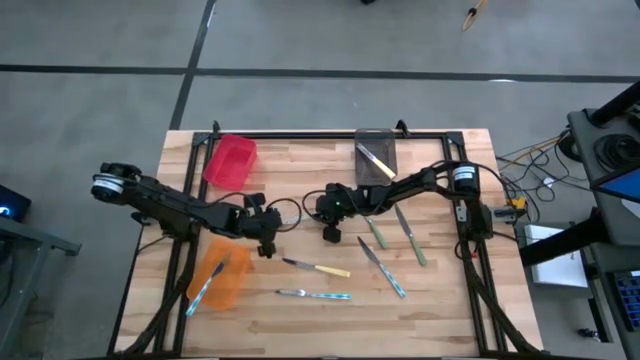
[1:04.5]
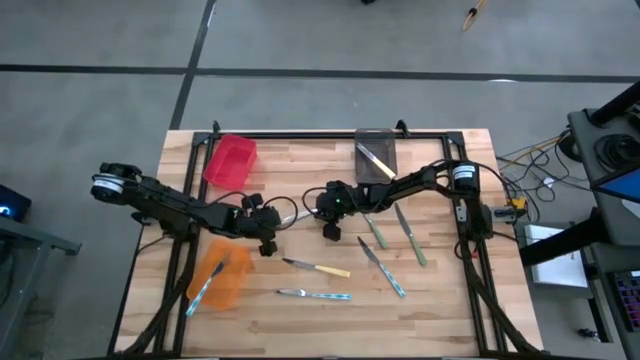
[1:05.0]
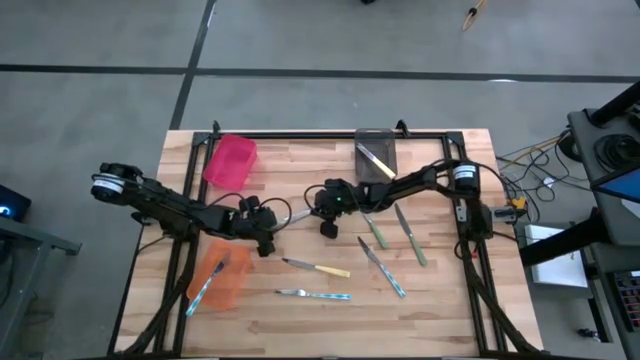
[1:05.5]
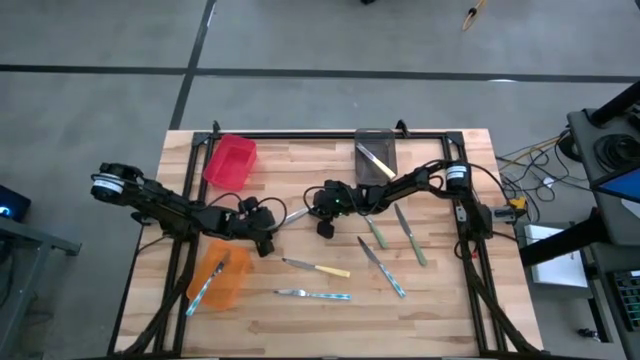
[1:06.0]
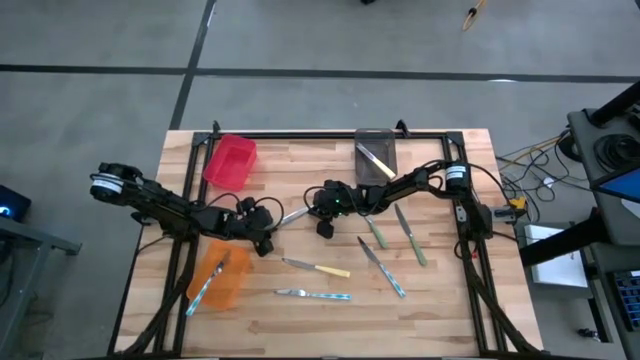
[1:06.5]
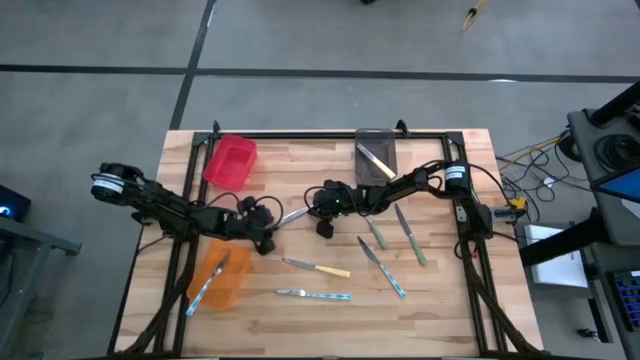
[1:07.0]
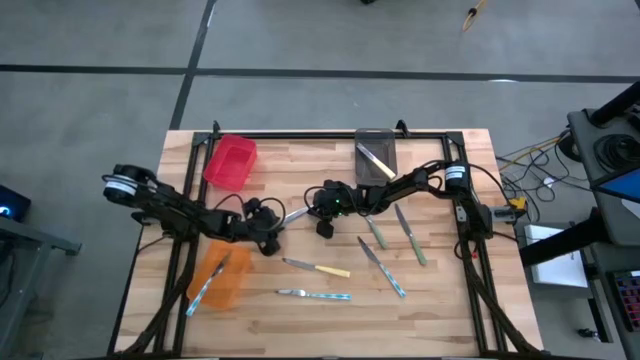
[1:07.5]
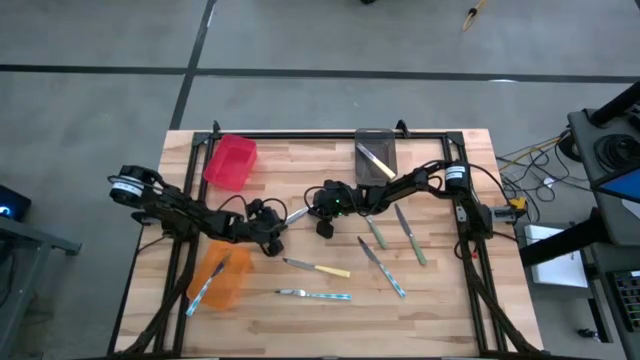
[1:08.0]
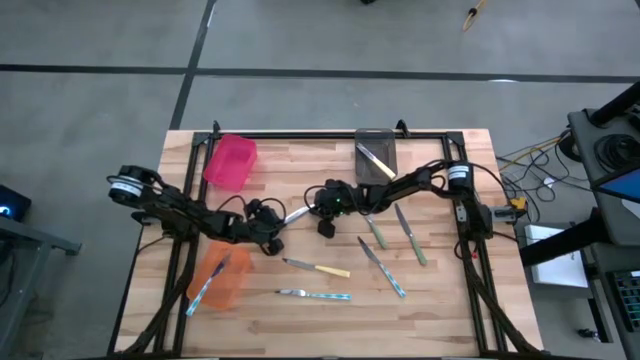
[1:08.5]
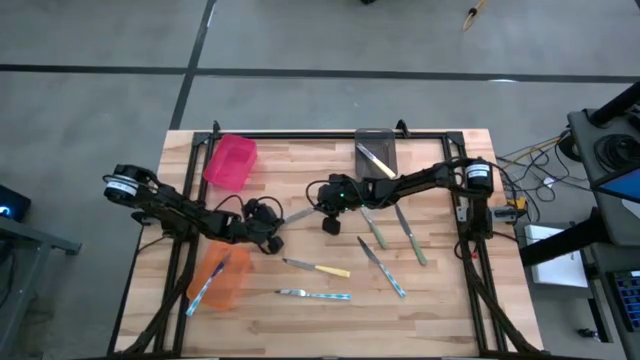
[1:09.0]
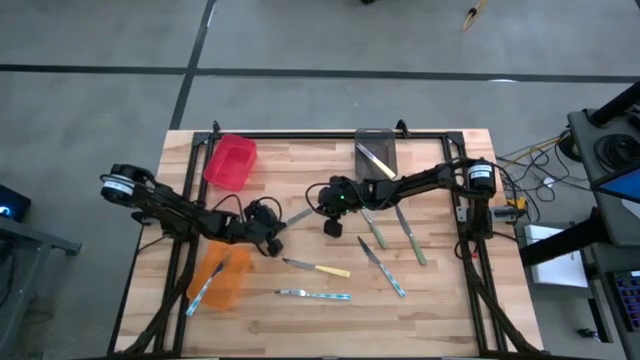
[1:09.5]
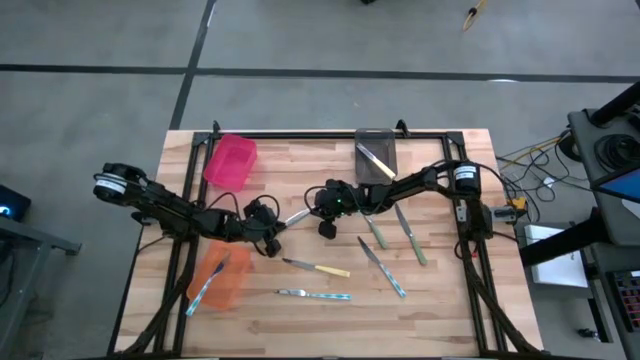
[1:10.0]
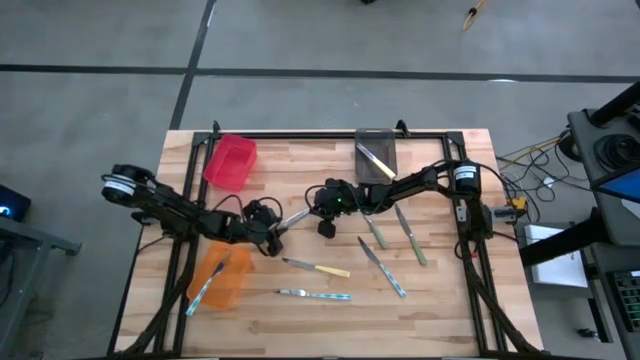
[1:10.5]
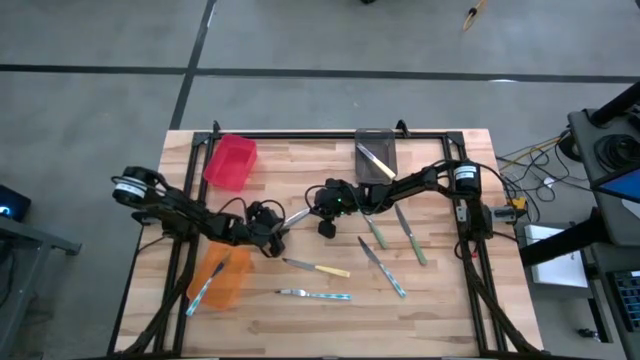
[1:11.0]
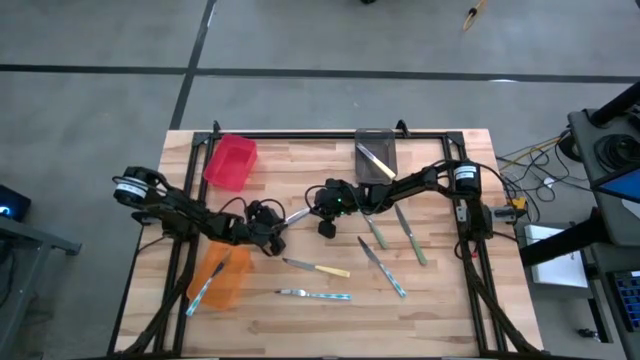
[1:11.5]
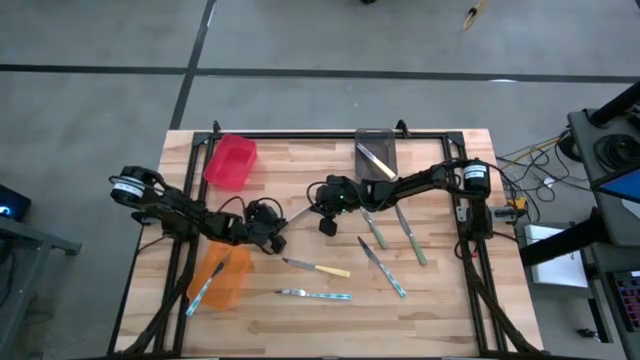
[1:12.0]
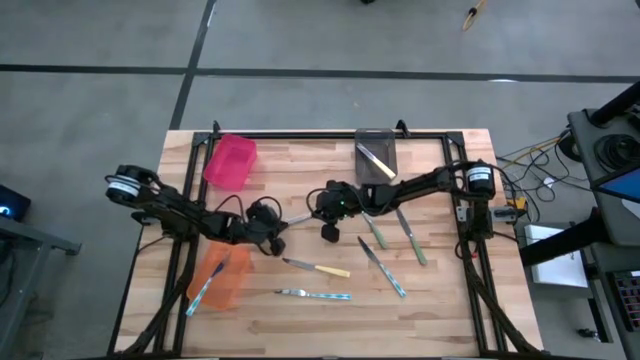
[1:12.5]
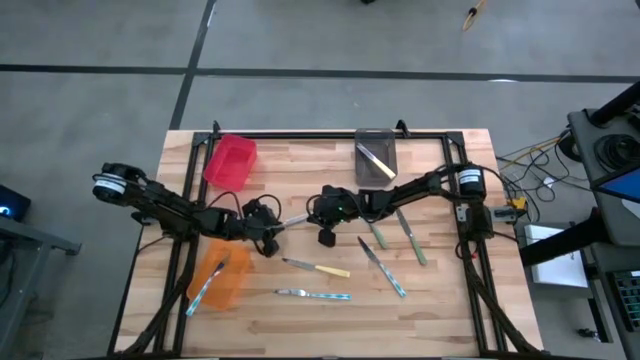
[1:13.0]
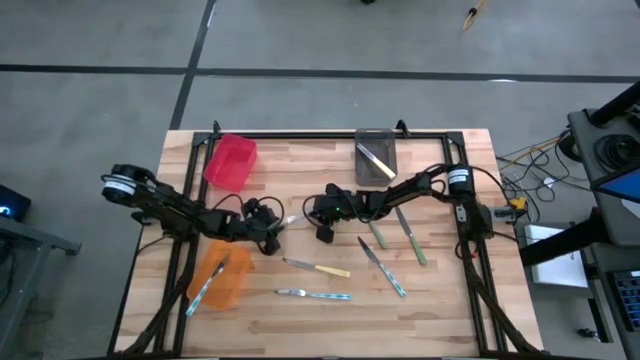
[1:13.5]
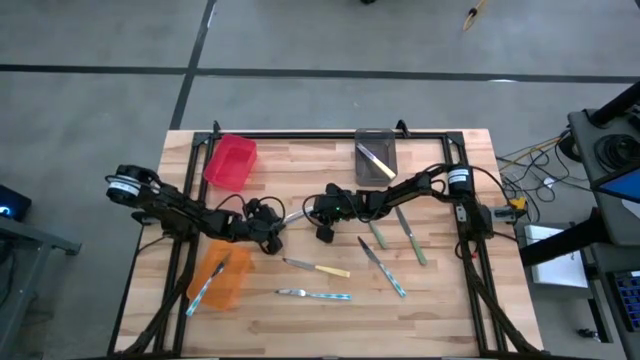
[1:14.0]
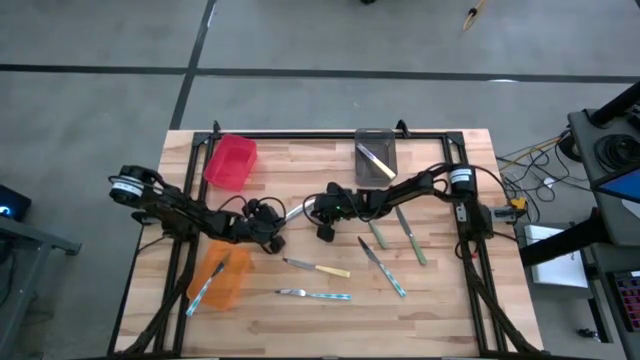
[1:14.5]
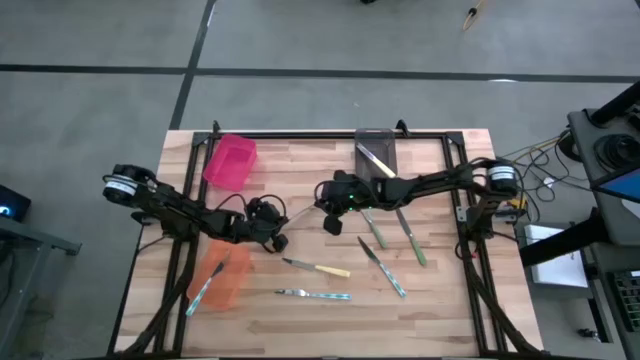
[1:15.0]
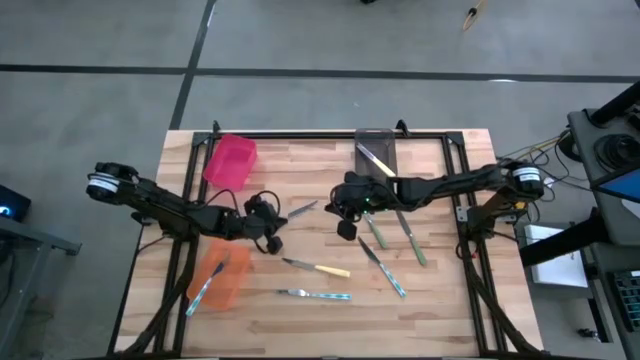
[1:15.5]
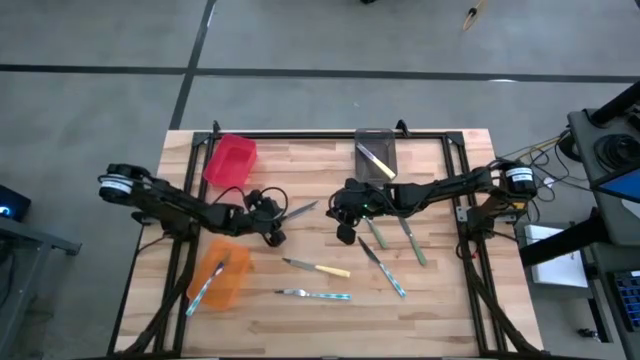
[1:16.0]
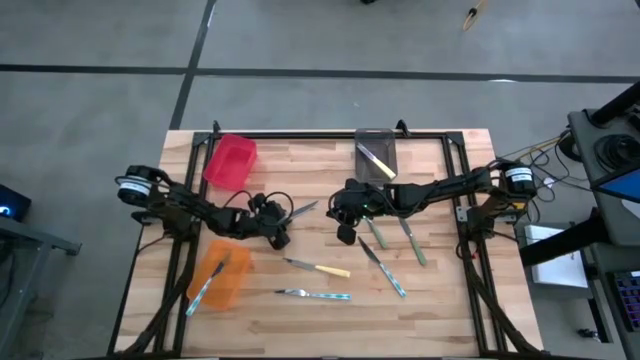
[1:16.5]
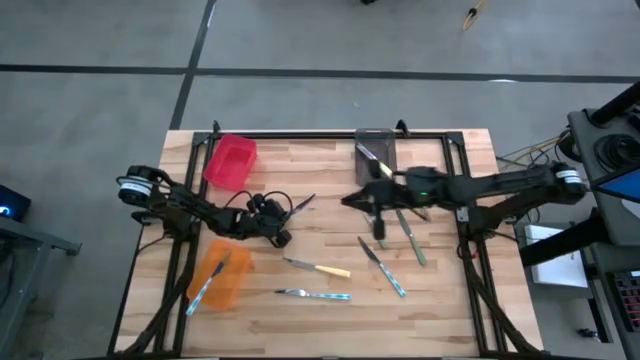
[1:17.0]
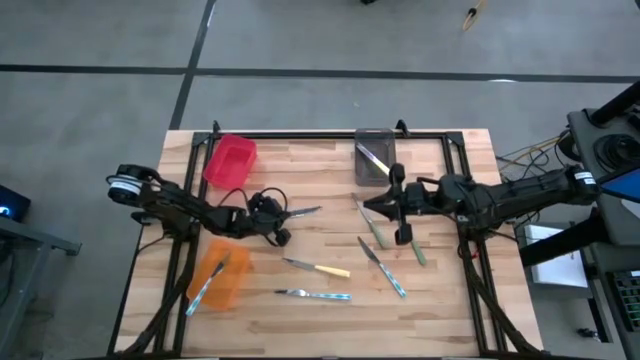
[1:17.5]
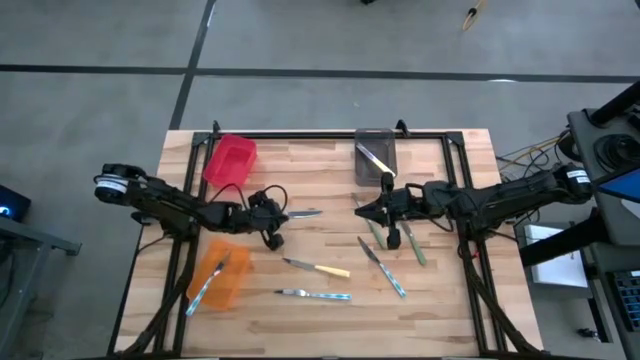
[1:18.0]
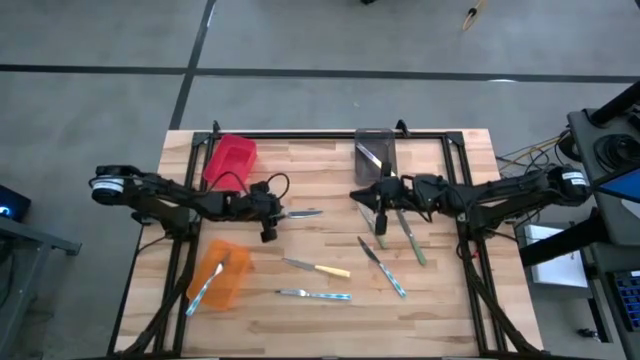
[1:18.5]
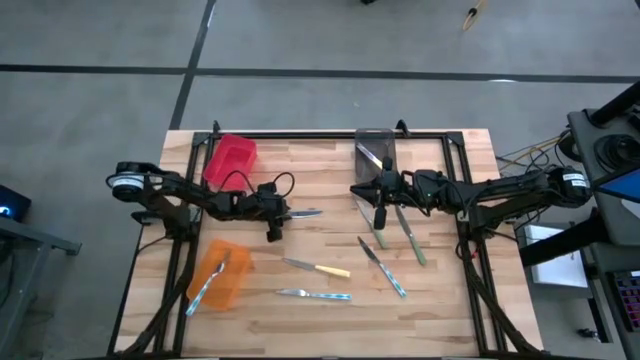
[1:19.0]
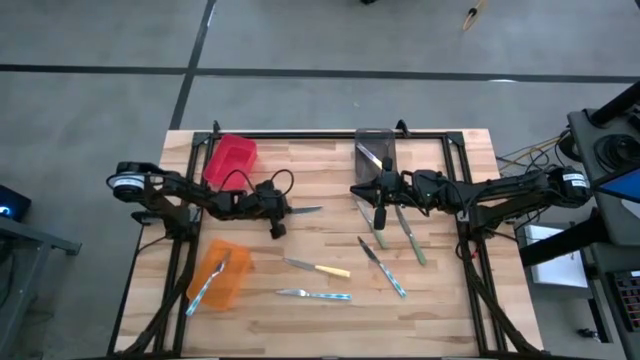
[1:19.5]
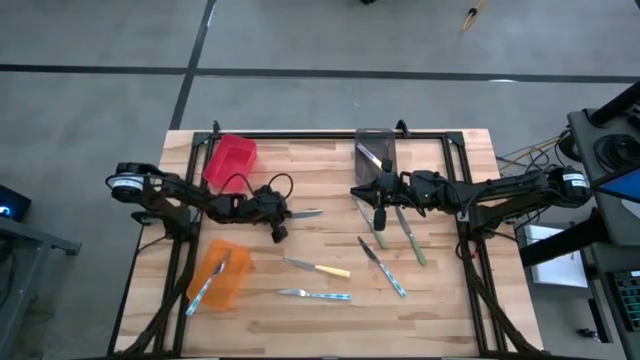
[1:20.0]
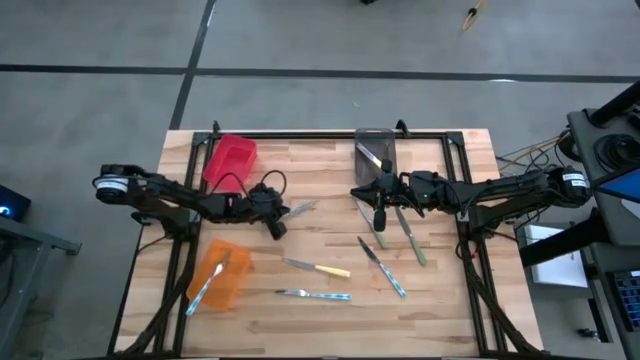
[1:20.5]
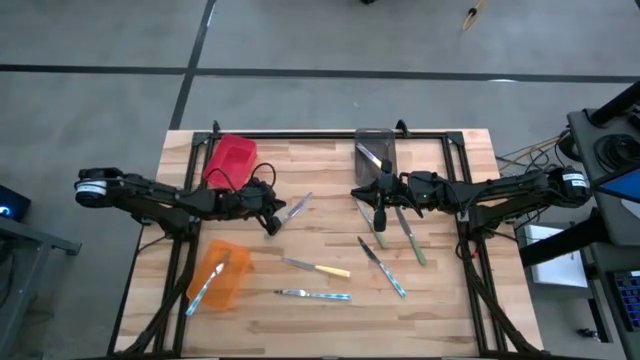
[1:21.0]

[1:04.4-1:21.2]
Task: Sort silverware by color (type)
Put the left green knife into the red bin

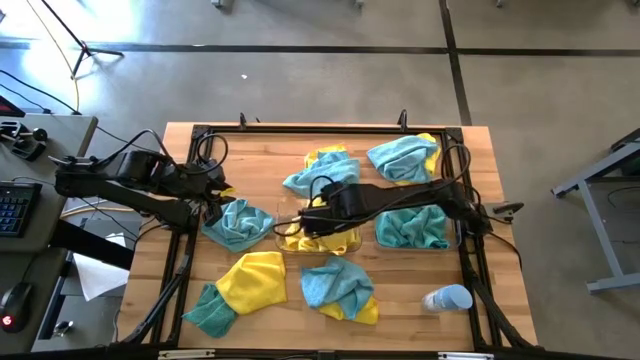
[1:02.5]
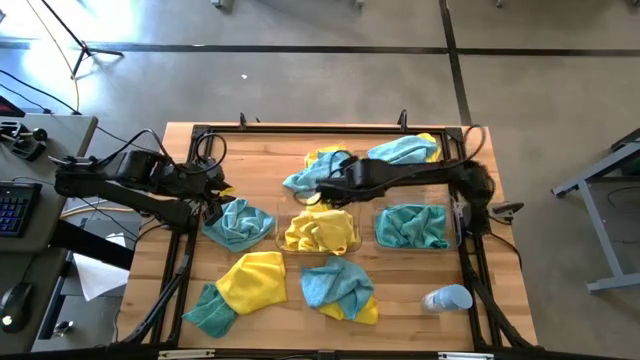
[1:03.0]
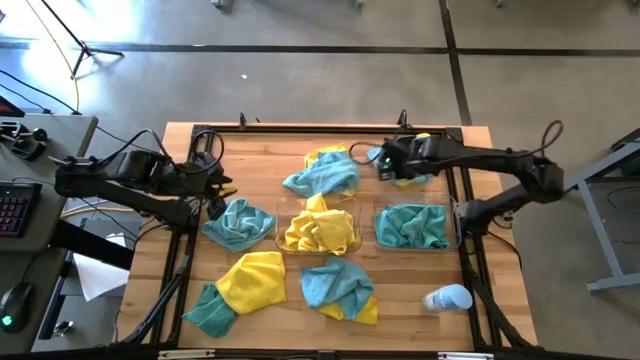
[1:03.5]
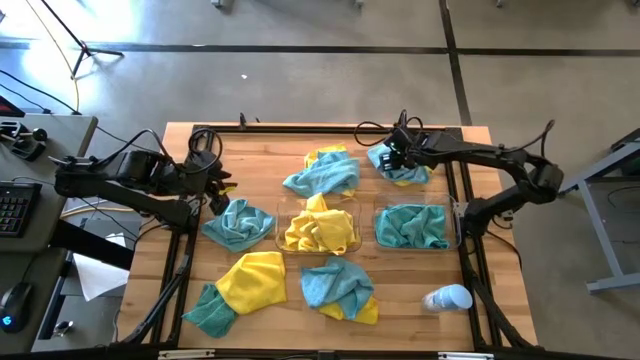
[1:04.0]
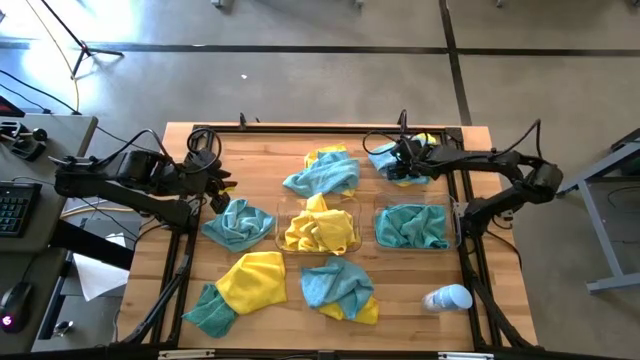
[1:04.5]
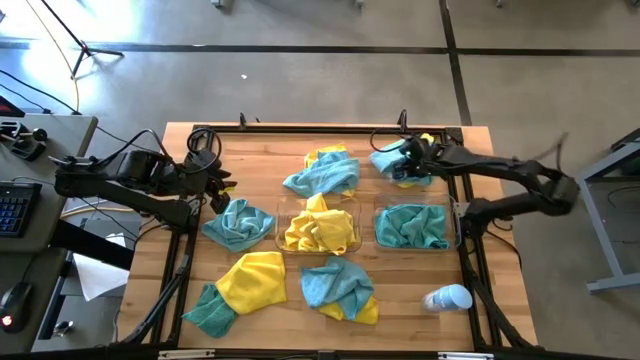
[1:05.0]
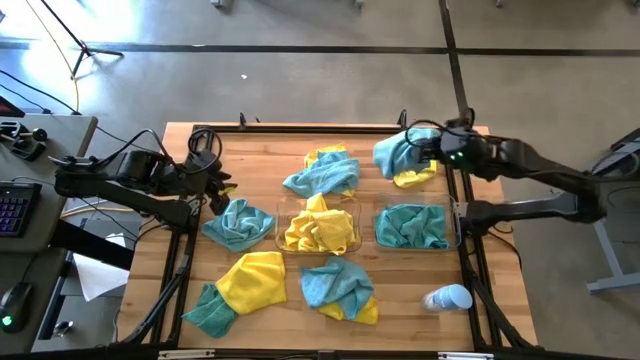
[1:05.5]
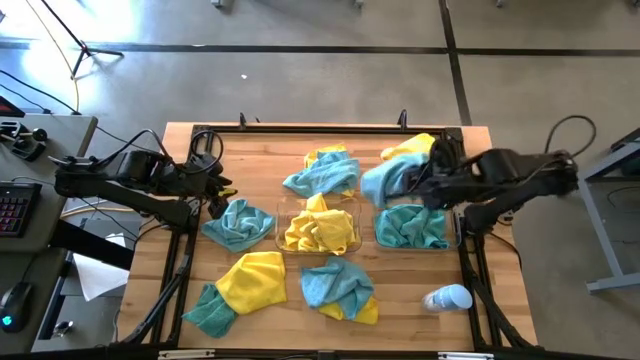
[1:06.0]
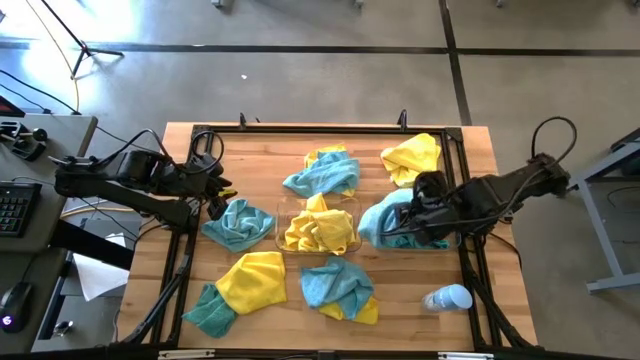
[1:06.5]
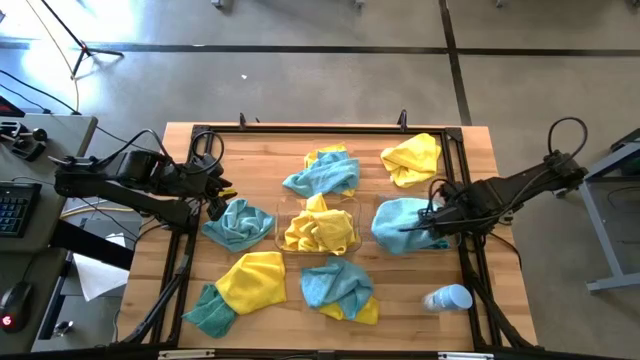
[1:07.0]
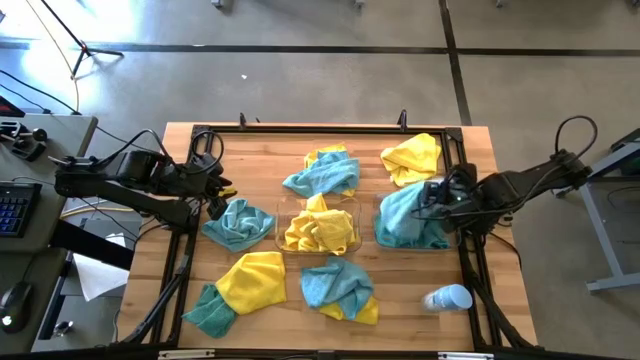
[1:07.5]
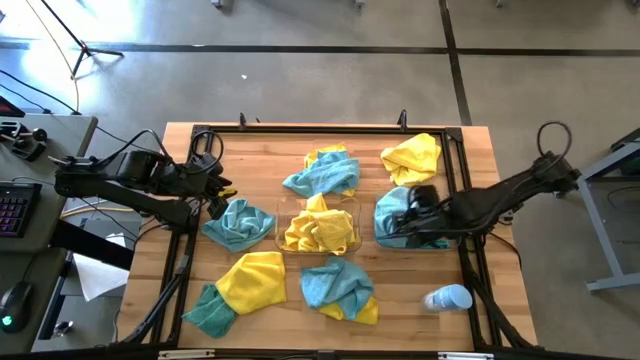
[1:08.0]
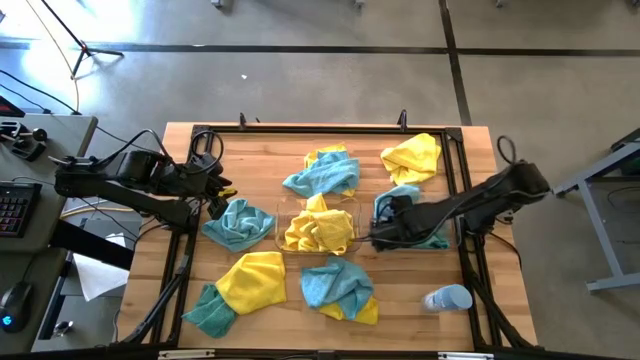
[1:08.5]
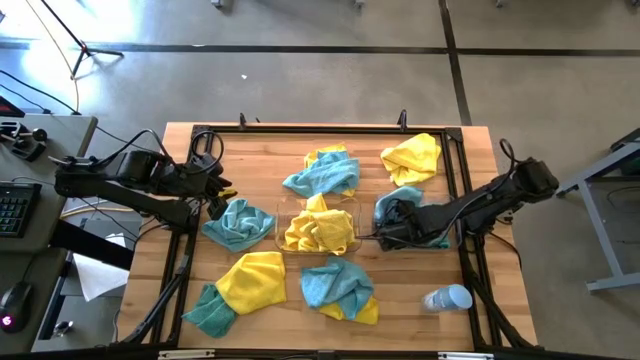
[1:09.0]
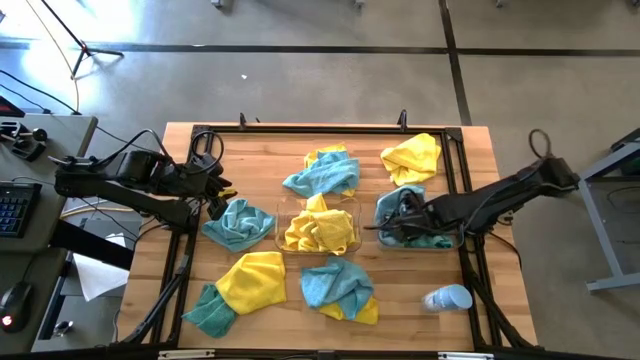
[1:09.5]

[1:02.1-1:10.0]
Task: Sort microfiber towel by color & place in baskets
Put the blue microfiber cloth into the right transparent bin
